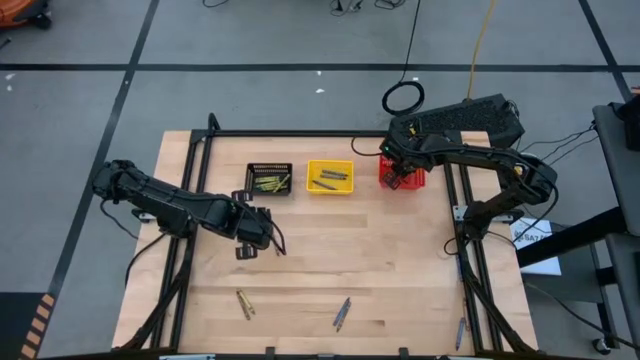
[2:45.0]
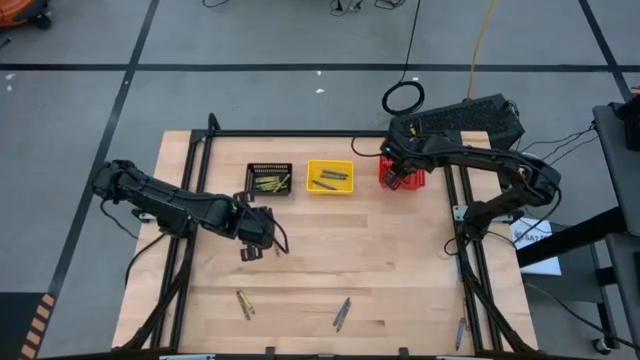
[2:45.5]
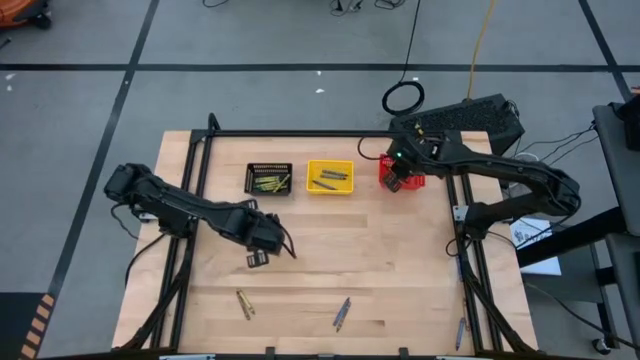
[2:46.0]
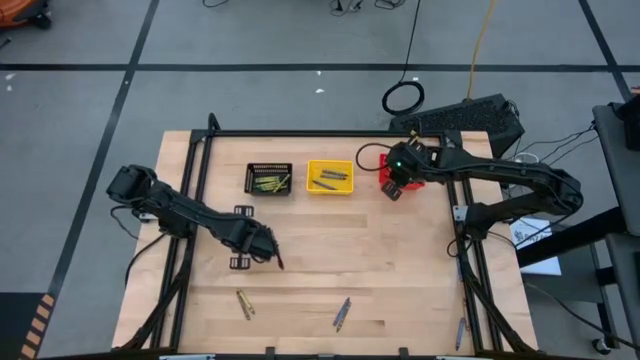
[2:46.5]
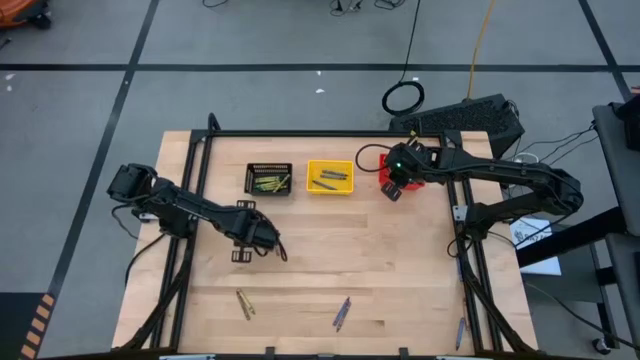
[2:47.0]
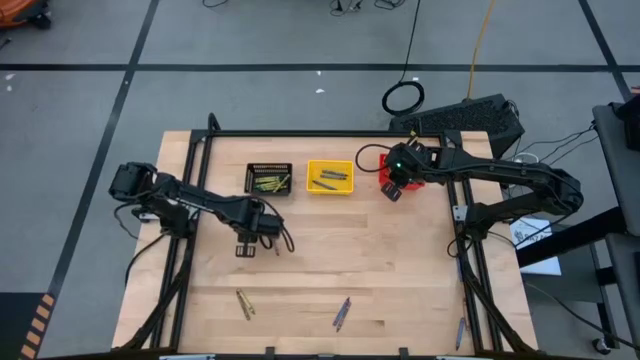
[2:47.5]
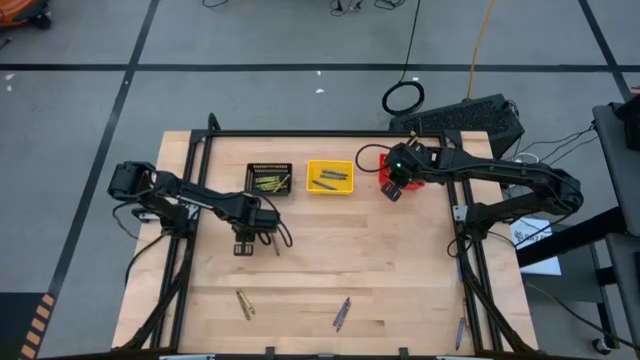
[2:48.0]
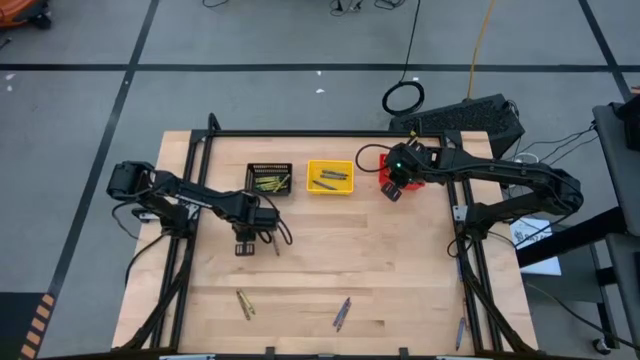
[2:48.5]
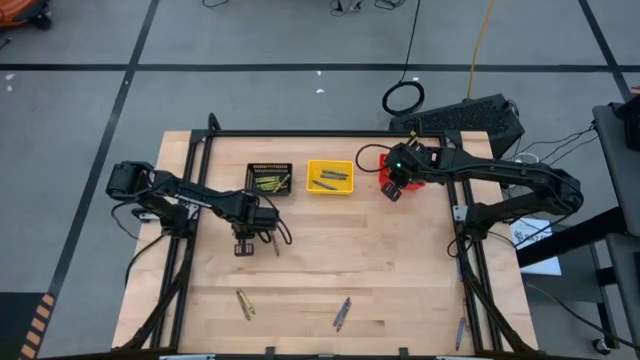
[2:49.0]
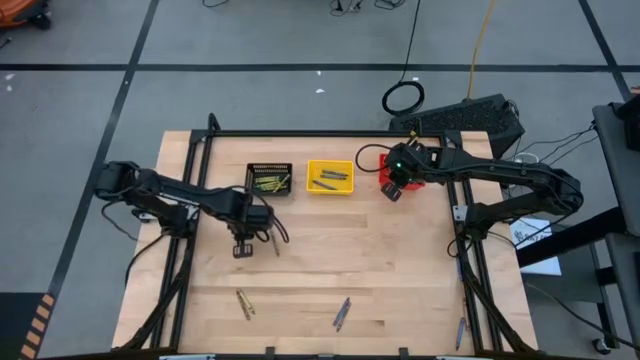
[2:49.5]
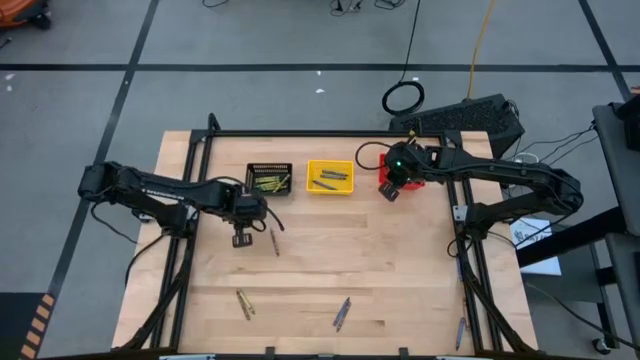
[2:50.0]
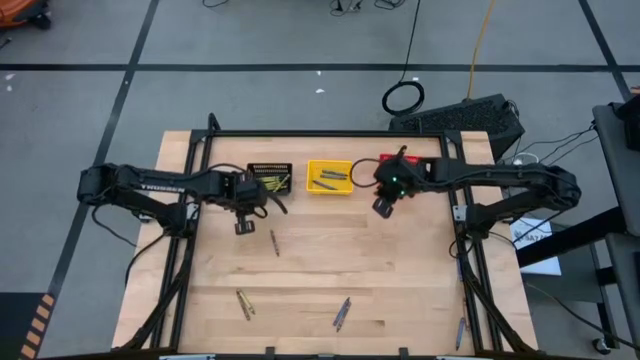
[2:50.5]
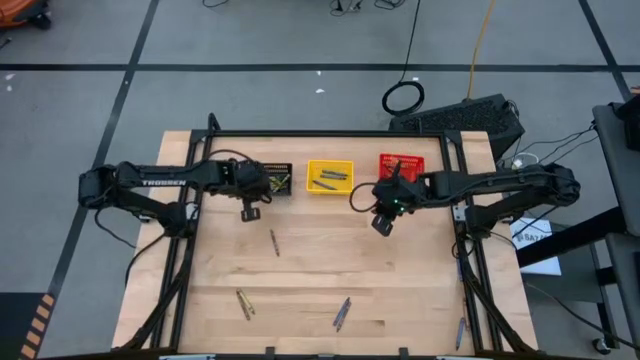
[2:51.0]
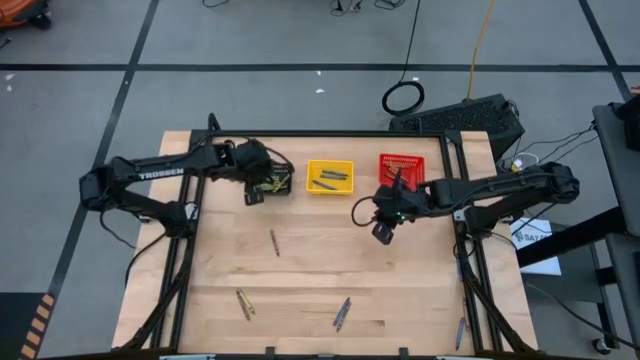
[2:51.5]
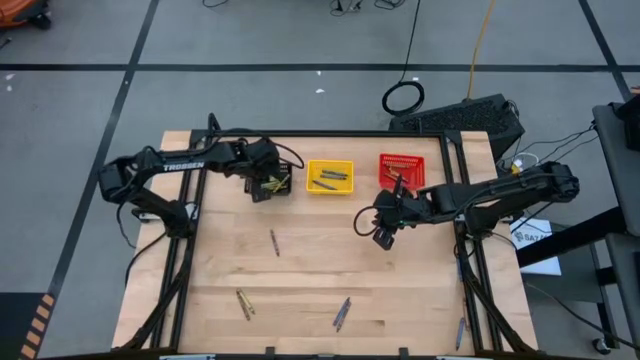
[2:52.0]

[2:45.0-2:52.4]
Task: Sort crayons
Put the green crayon into the black bin

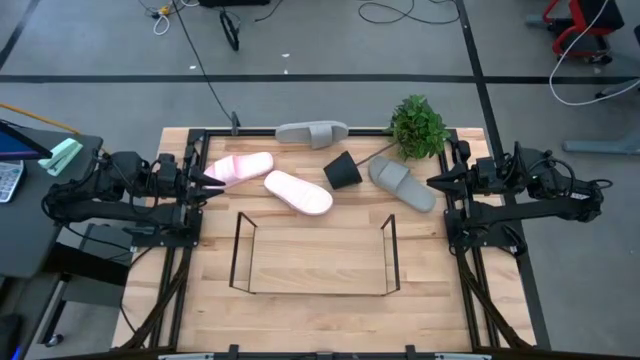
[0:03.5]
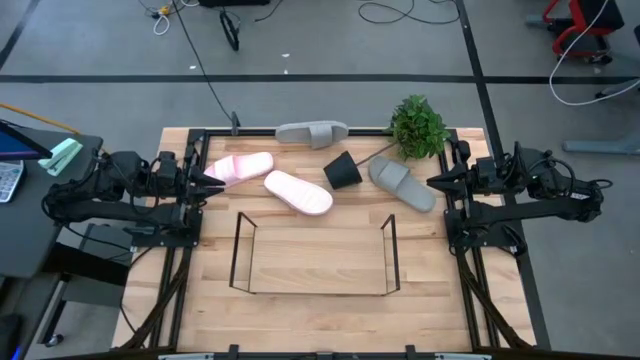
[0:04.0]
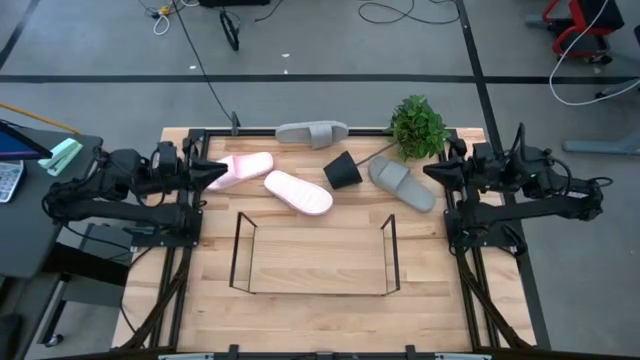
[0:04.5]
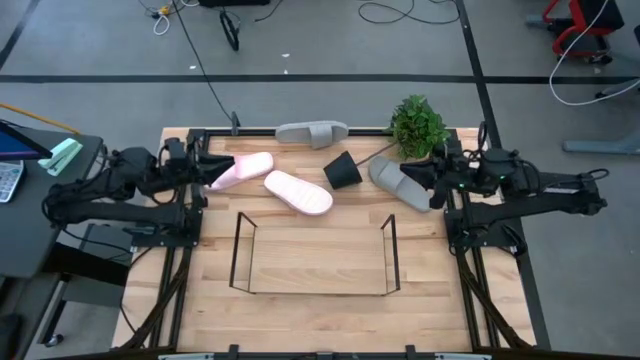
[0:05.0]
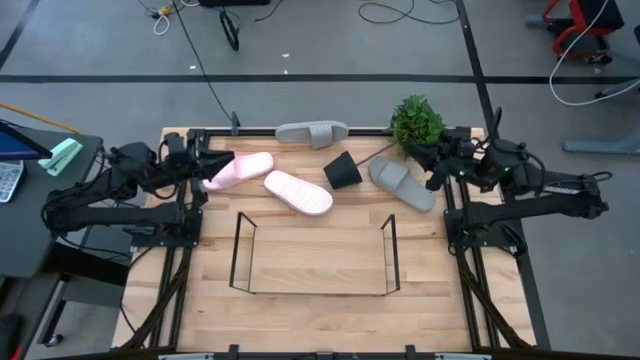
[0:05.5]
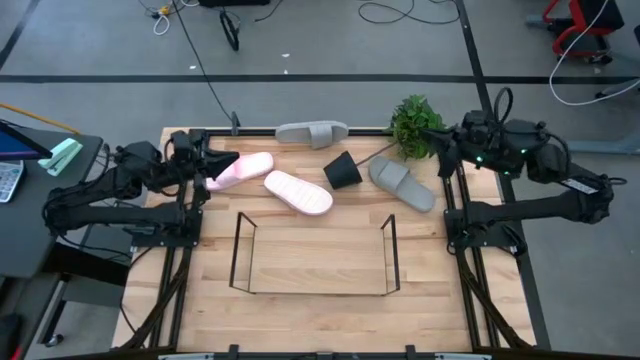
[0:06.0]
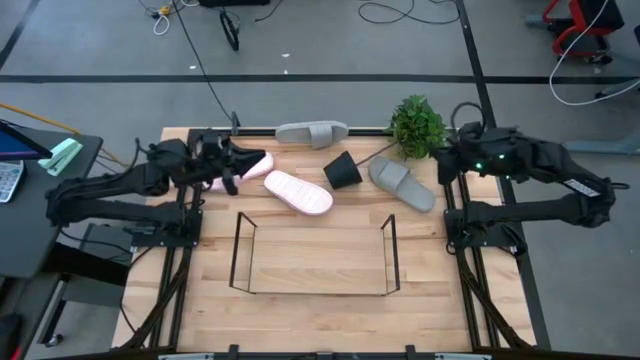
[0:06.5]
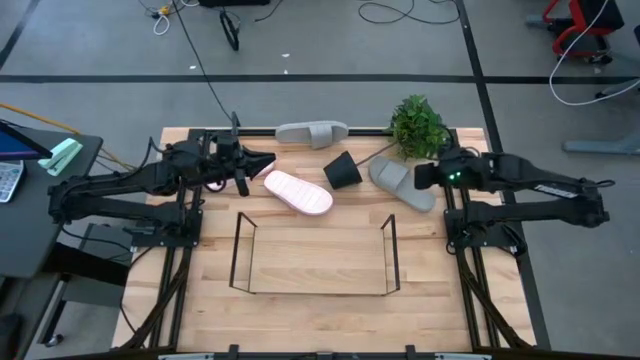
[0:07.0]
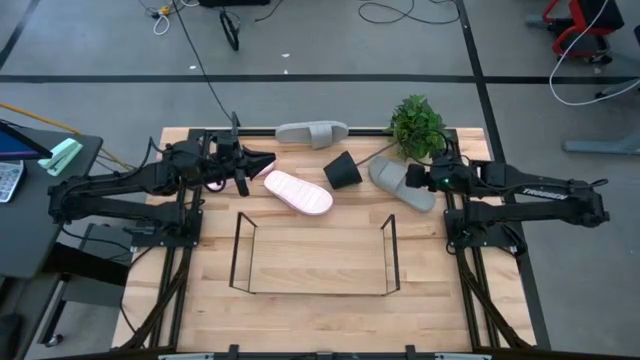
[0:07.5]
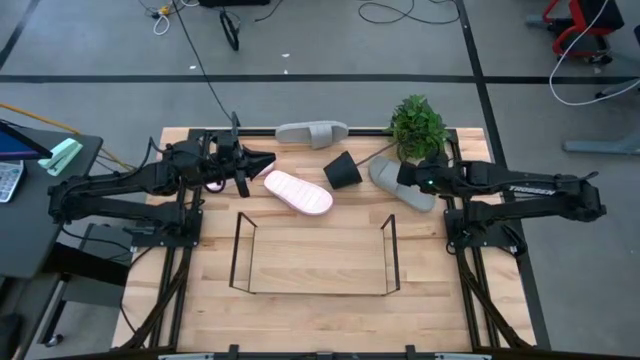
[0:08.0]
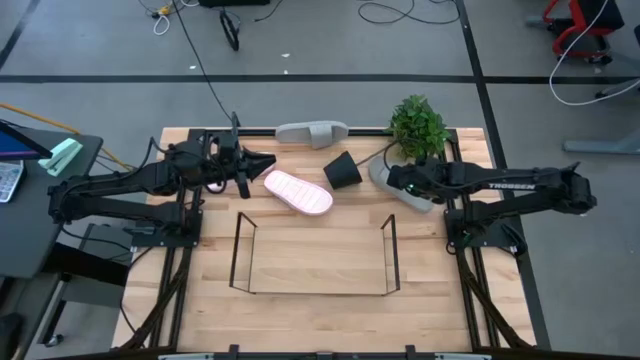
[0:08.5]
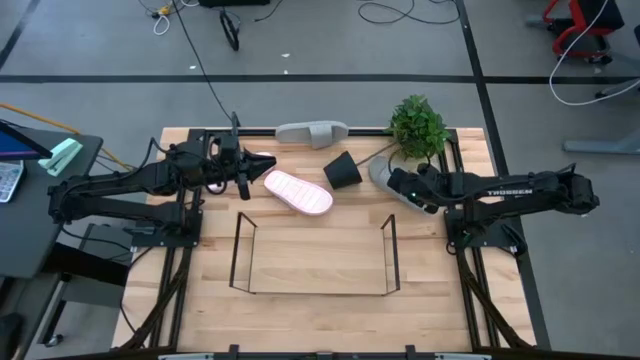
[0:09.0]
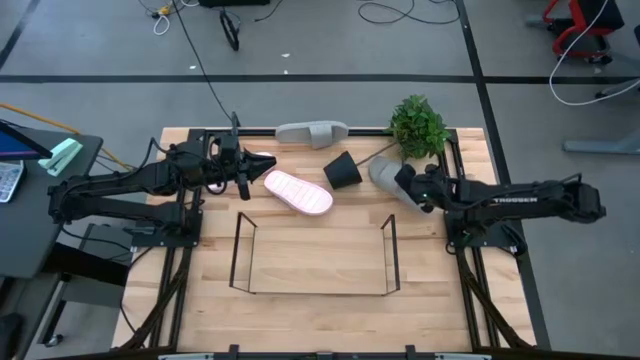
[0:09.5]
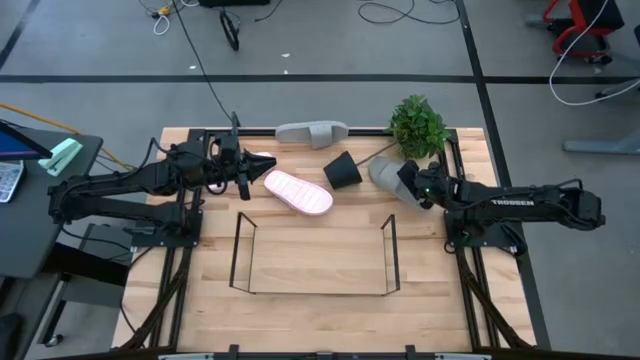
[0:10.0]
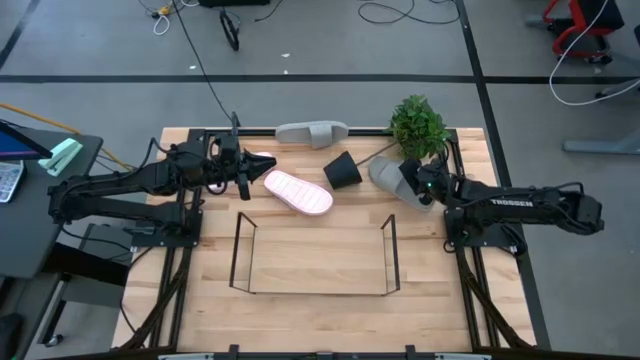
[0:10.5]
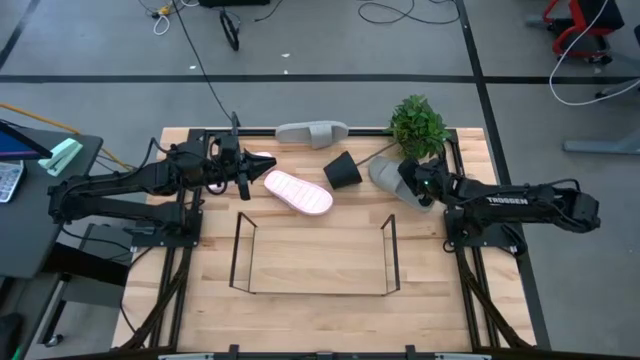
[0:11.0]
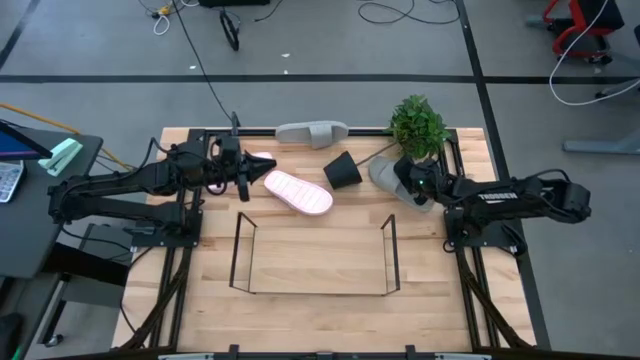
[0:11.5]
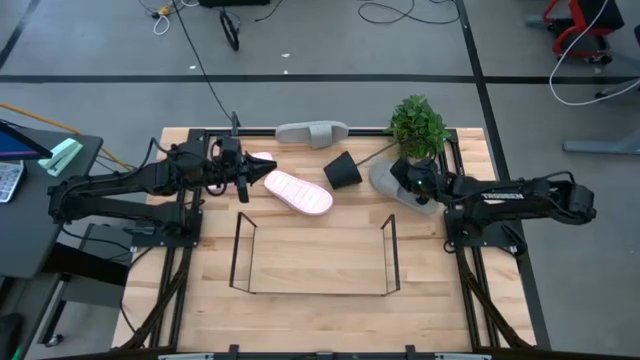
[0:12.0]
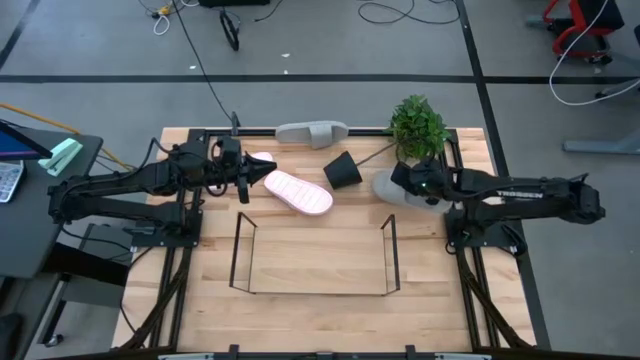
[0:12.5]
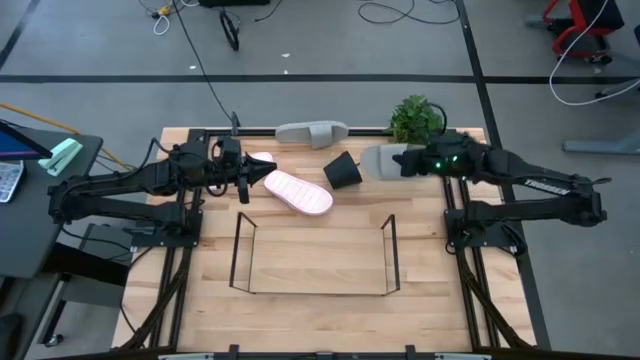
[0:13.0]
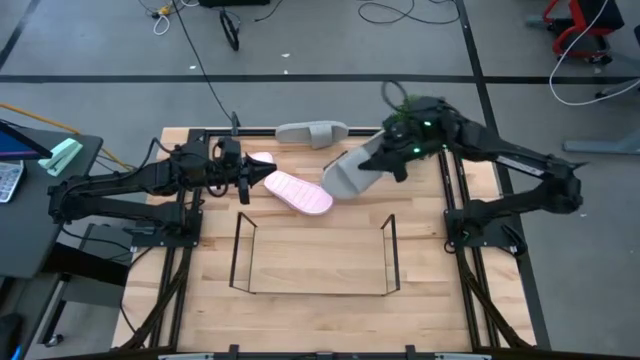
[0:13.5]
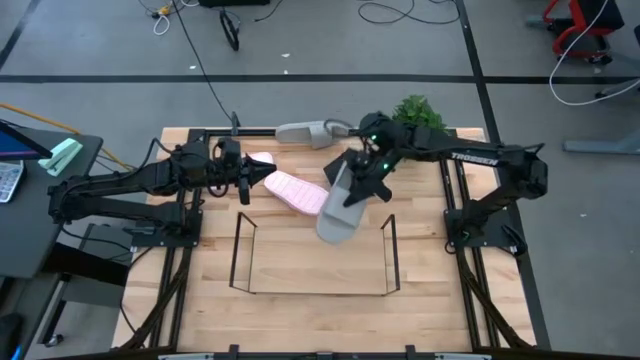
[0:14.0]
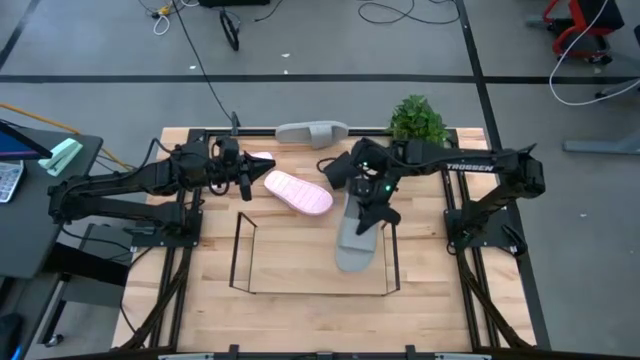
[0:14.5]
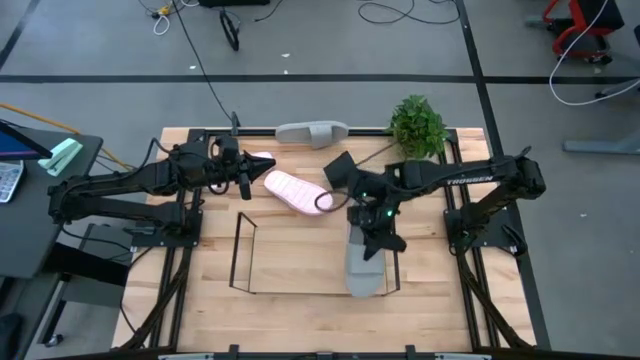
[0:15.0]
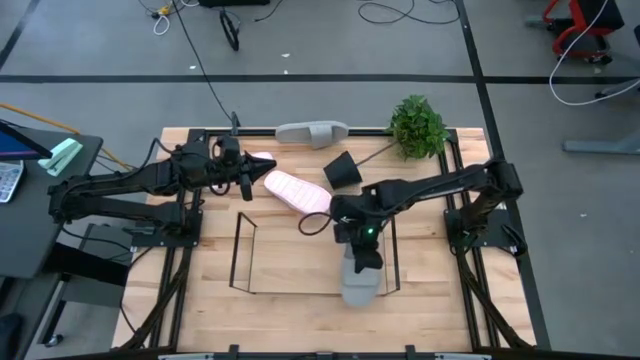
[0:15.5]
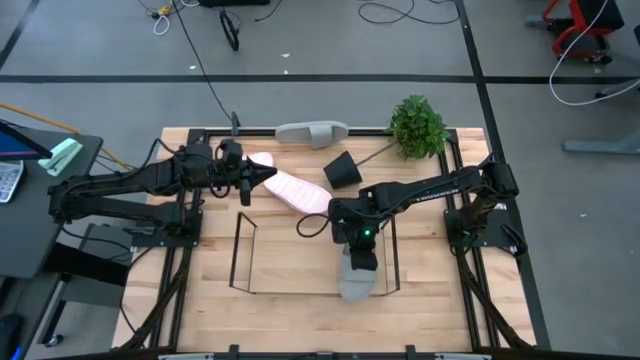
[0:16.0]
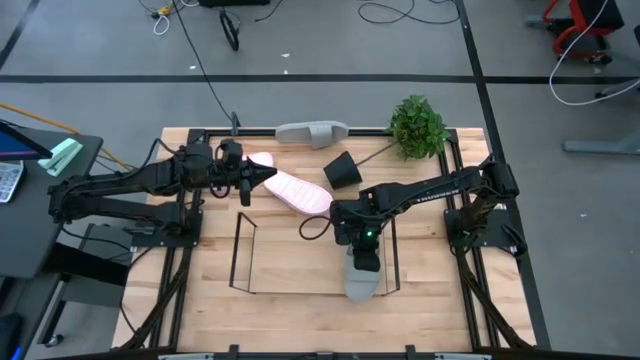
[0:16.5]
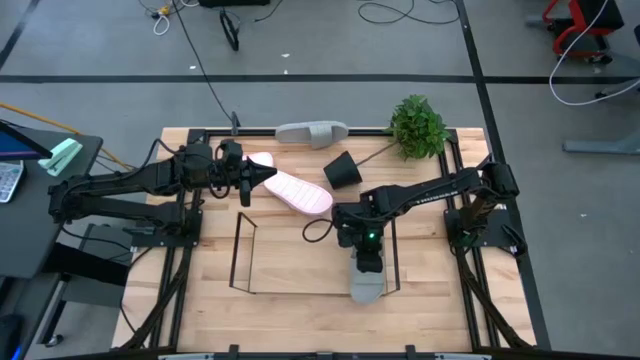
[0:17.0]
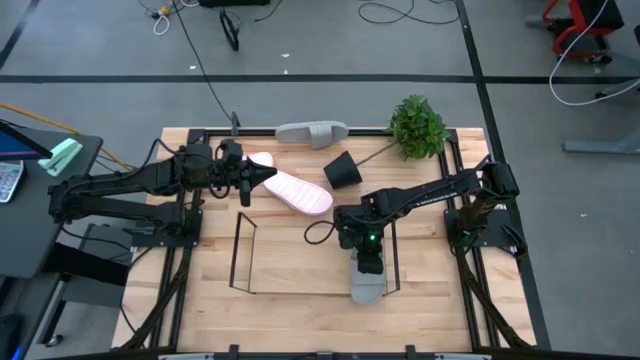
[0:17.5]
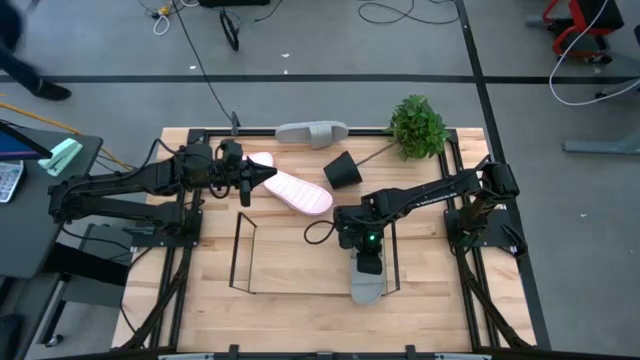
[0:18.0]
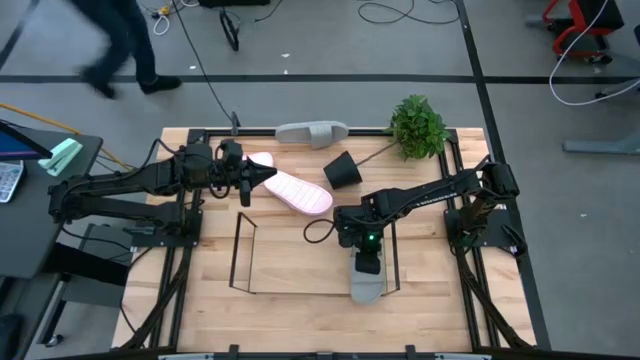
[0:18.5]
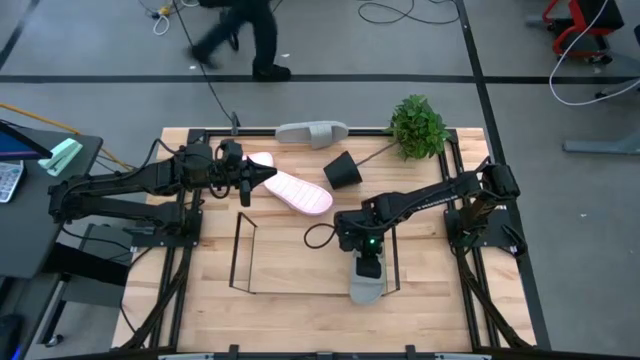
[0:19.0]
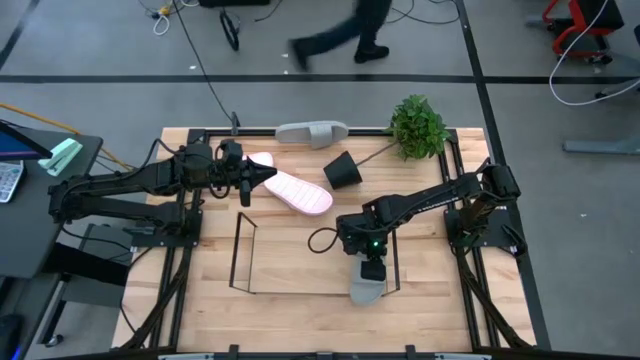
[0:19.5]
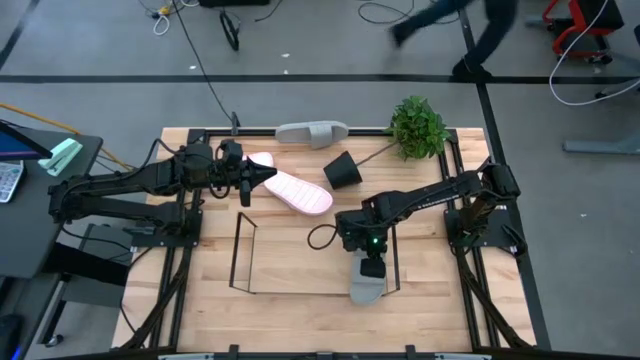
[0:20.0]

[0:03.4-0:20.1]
Task: Pick and place slides into the shelf
Put the right gray slipper on the shelf
